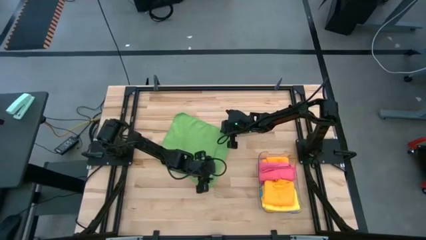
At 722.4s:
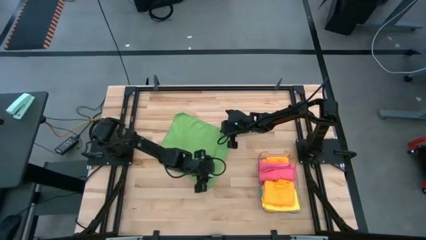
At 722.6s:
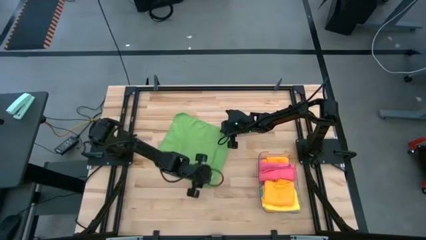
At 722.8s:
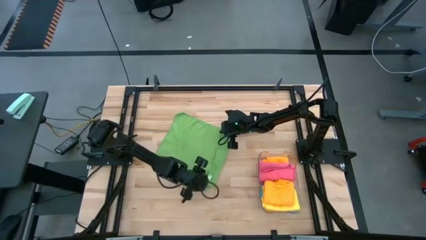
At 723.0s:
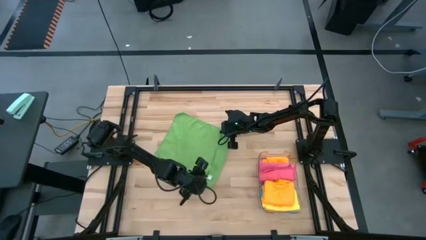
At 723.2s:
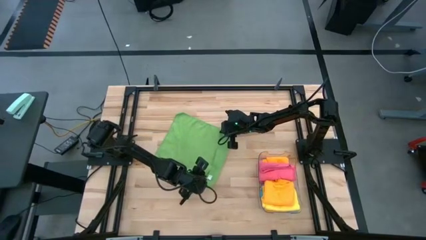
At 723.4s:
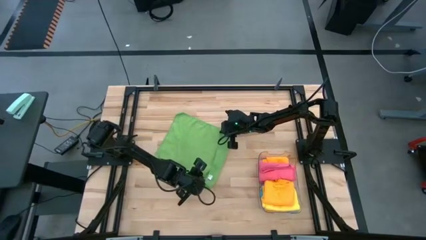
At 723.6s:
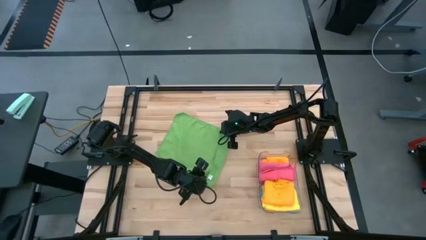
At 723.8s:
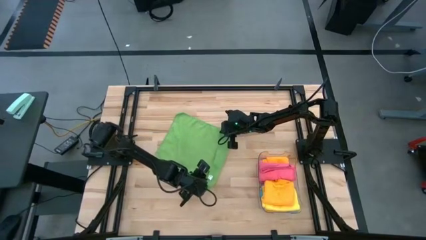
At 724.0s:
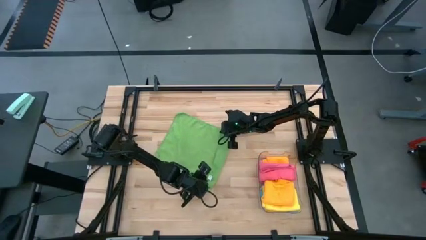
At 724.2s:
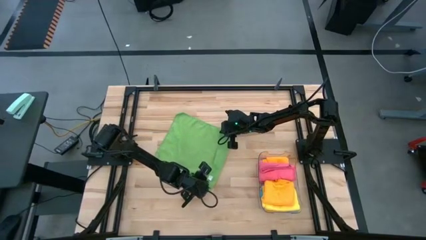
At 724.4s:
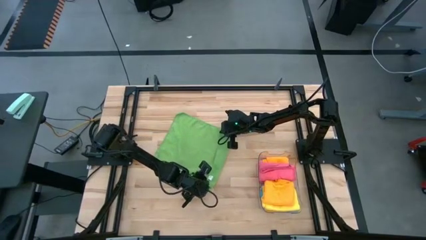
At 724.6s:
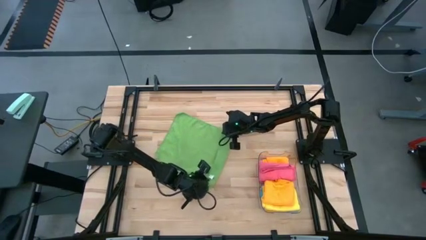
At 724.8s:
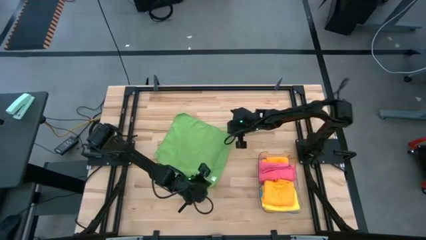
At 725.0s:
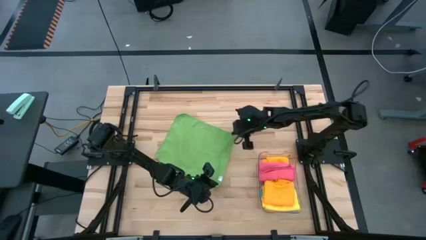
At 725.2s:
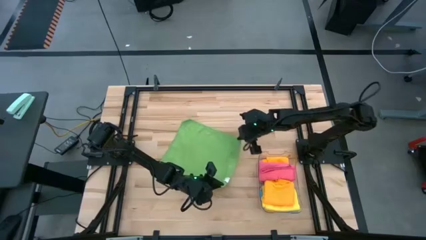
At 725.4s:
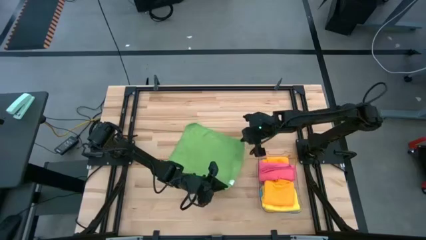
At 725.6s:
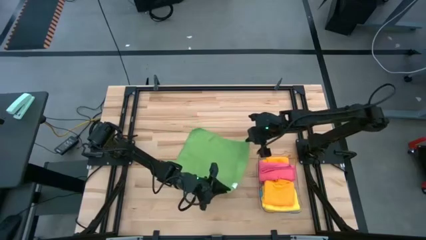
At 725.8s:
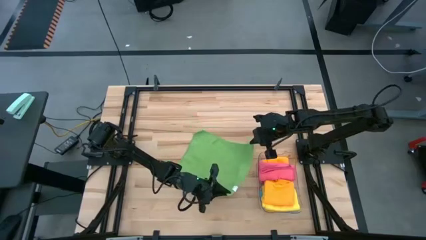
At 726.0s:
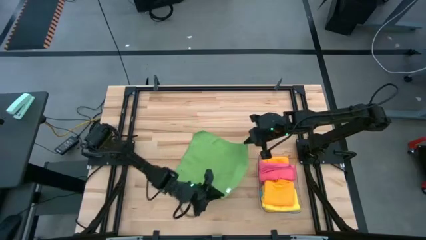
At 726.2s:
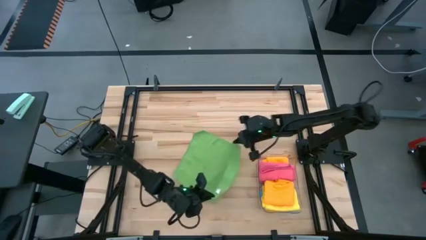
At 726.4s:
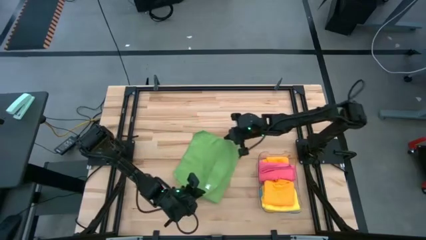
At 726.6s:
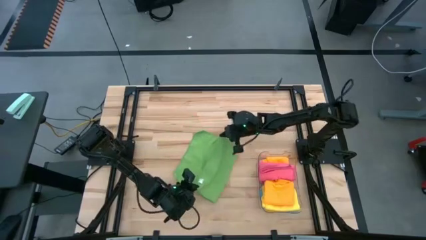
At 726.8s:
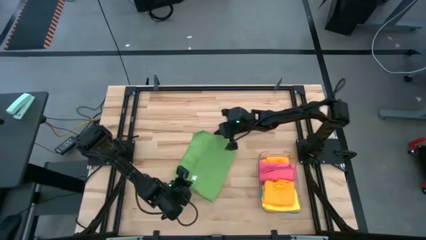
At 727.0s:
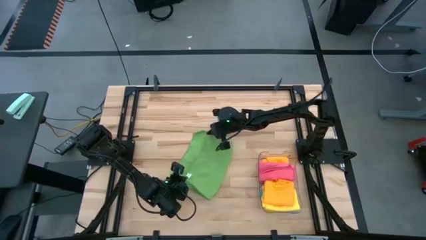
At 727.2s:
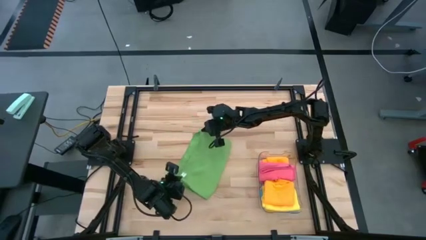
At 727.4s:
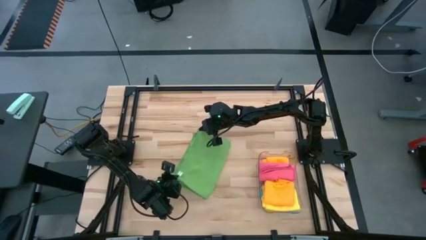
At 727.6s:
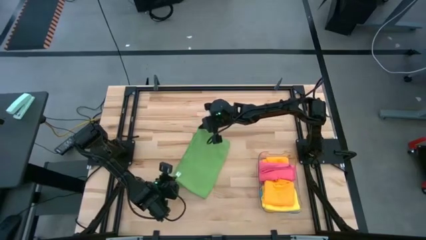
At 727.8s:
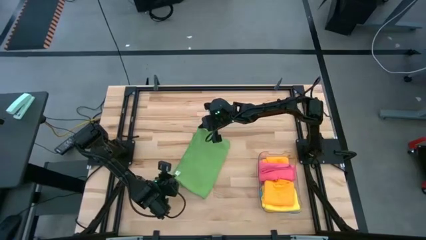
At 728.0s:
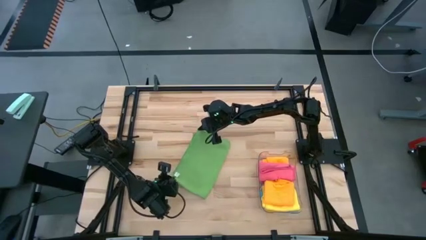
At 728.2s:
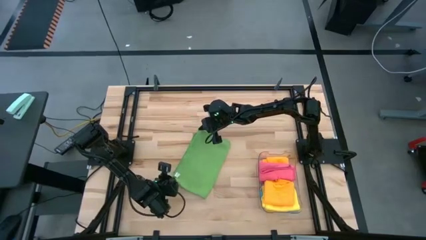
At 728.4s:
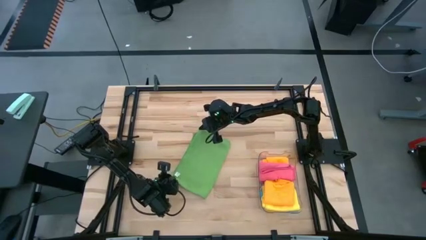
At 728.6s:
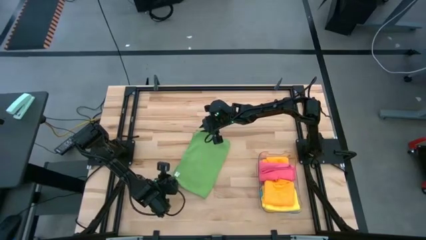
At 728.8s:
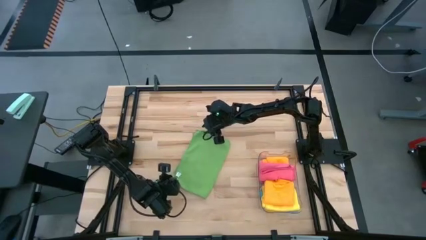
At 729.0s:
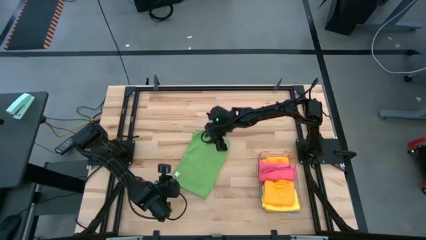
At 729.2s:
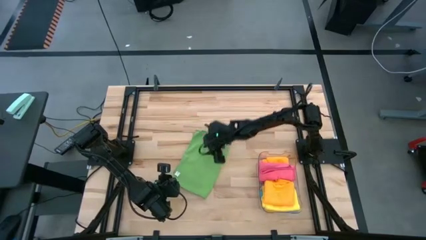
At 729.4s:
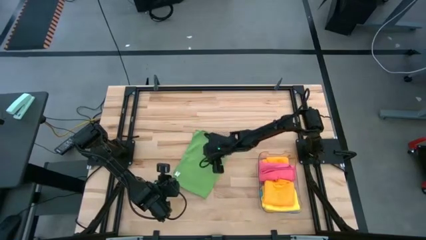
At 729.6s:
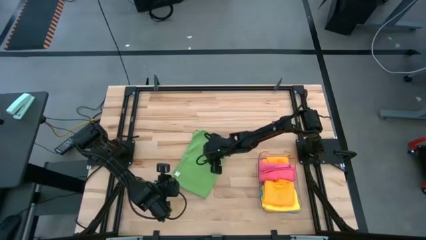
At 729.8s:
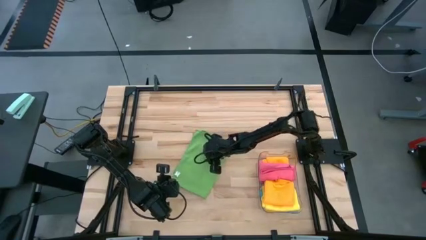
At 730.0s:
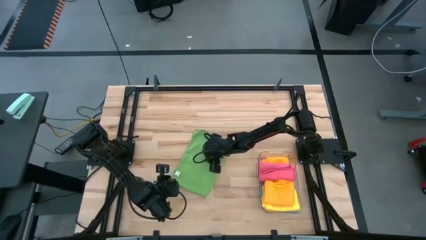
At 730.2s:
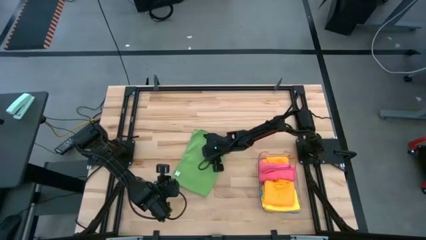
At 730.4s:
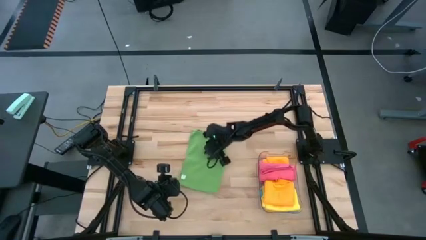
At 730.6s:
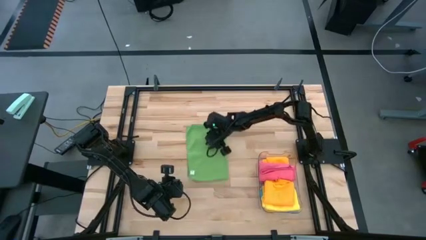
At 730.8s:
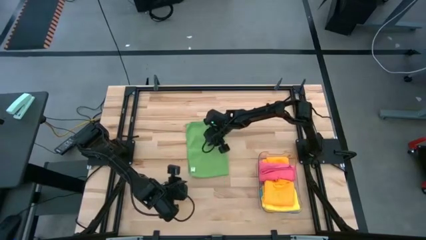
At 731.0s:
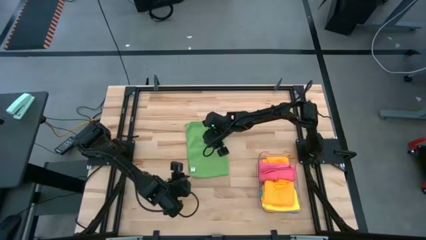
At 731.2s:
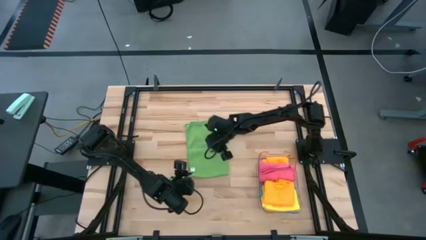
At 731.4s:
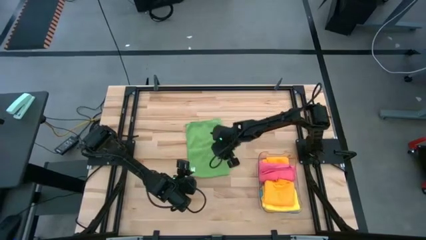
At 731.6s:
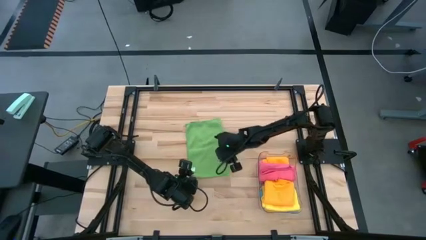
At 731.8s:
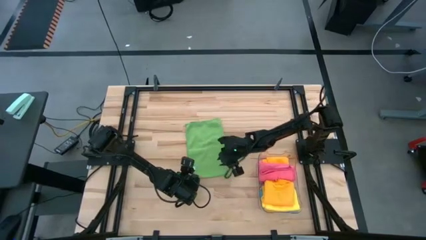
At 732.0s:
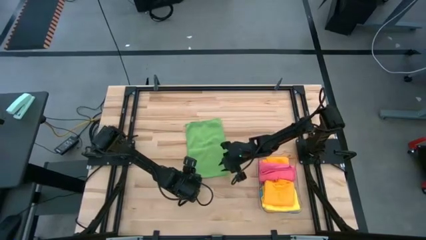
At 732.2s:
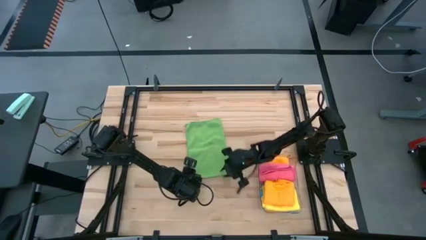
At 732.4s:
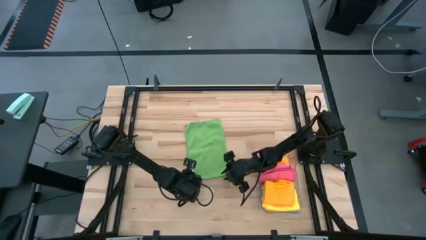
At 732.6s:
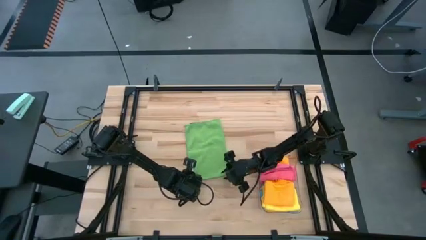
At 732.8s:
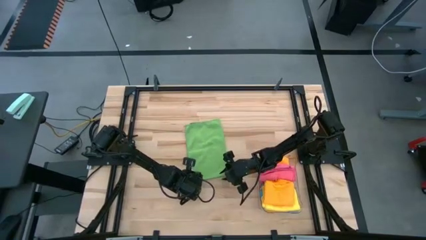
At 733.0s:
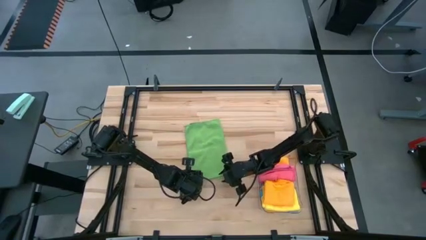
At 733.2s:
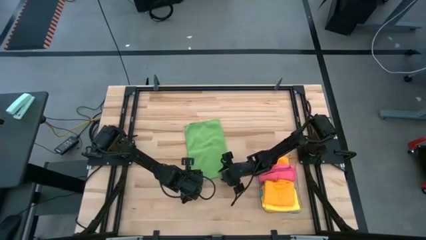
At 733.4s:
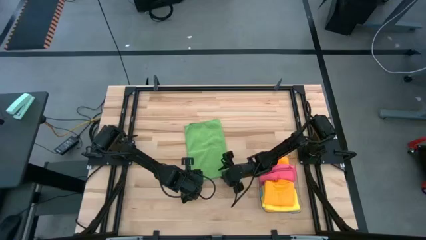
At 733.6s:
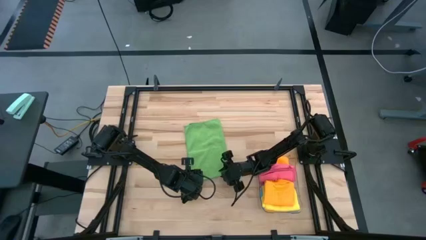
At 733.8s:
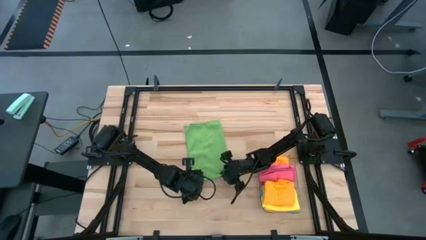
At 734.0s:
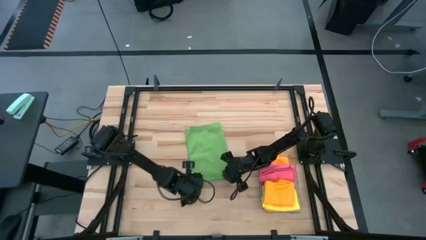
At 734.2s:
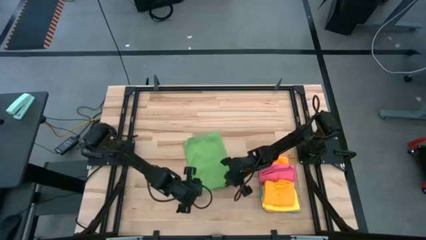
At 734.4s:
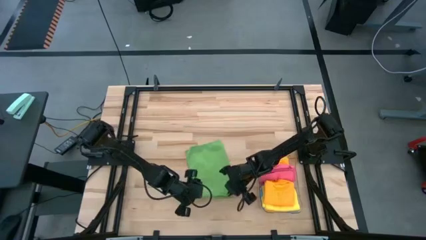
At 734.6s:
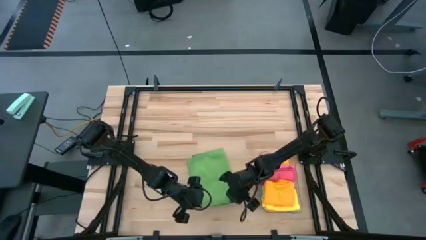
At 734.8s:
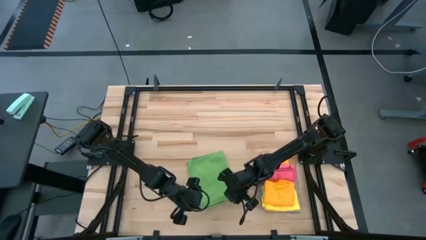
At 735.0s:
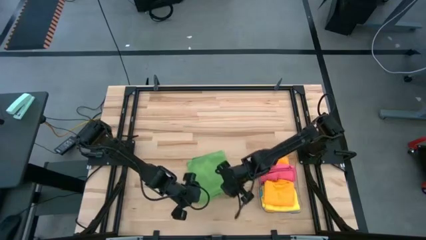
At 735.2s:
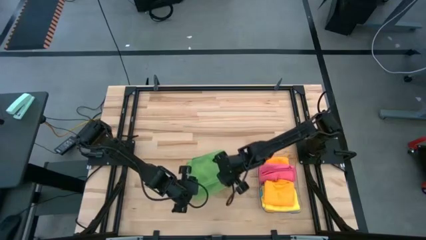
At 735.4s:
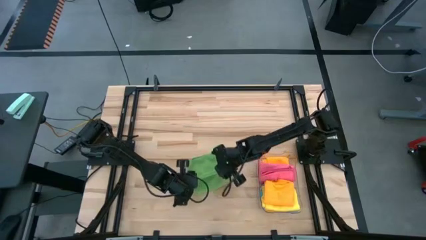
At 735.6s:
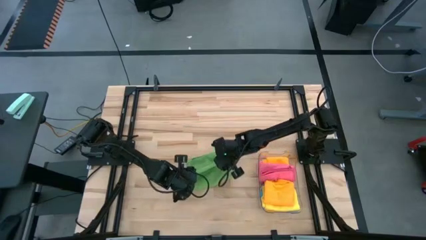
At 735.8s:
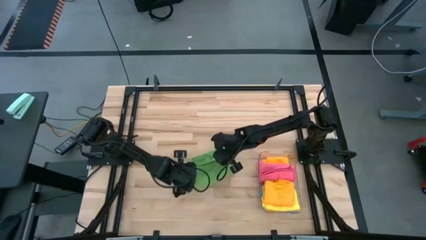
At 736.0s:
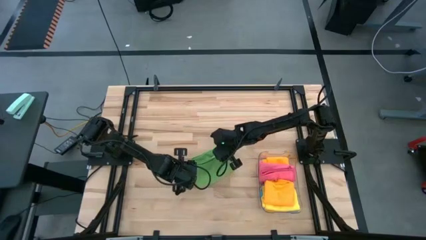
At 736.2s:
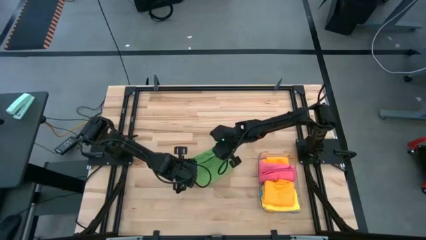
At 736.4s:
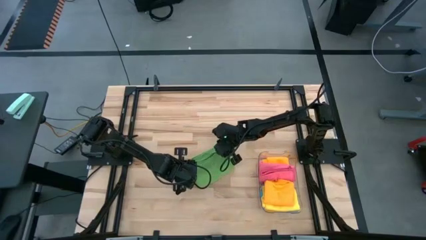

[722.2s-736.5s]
Task: Fold microfiber towels
Fold the green towel

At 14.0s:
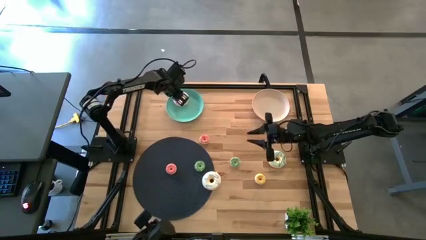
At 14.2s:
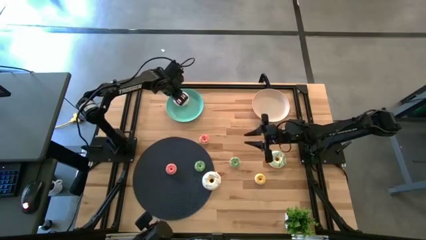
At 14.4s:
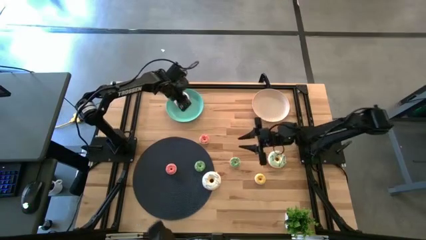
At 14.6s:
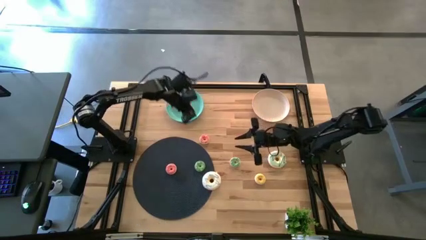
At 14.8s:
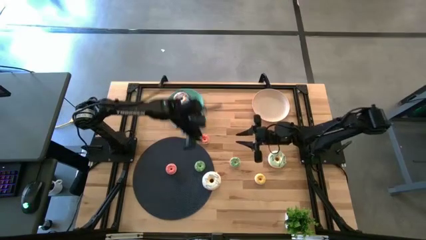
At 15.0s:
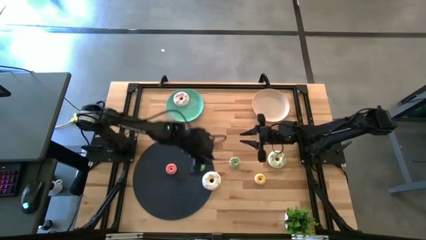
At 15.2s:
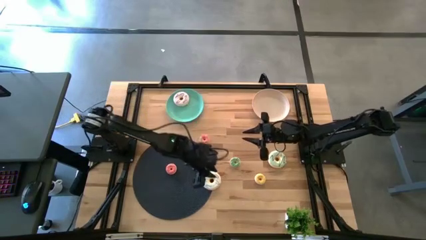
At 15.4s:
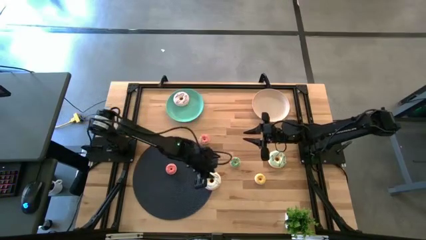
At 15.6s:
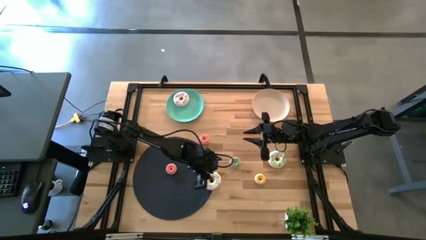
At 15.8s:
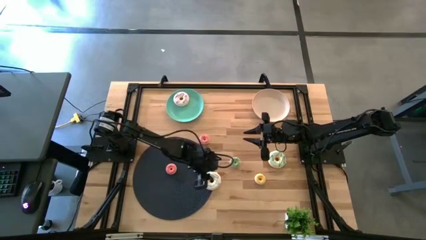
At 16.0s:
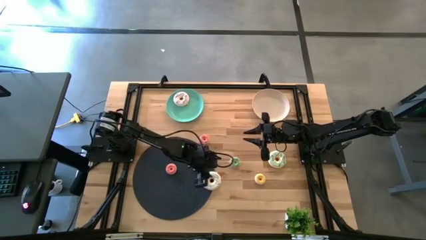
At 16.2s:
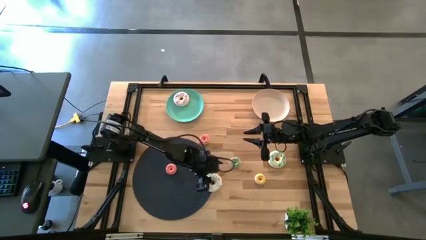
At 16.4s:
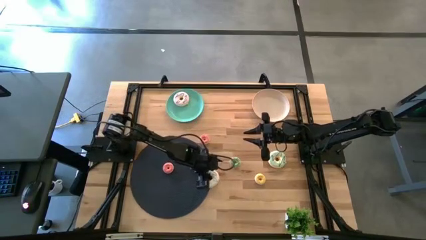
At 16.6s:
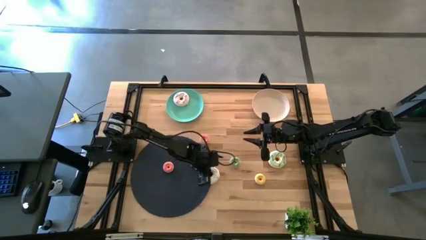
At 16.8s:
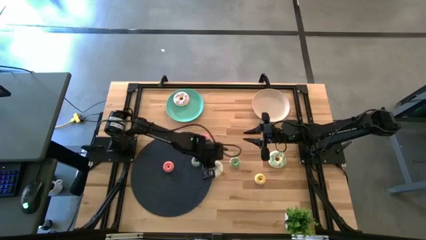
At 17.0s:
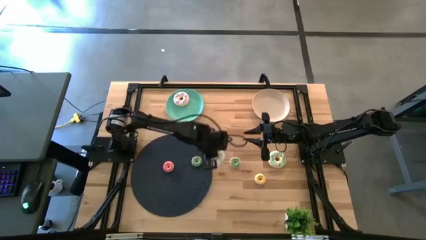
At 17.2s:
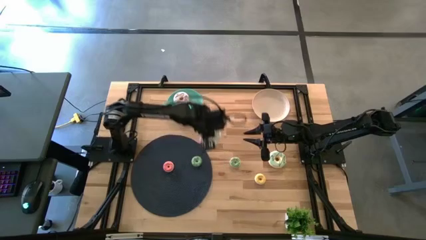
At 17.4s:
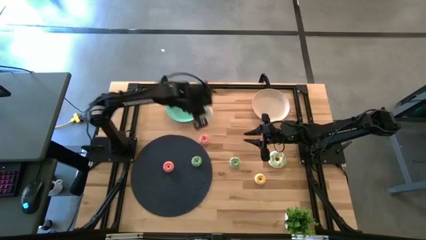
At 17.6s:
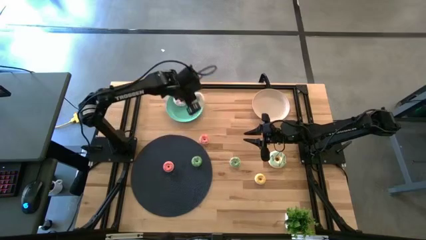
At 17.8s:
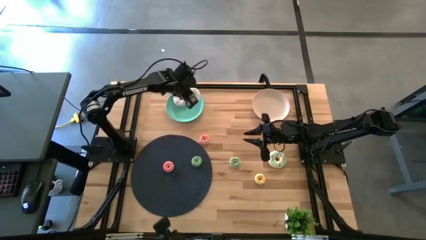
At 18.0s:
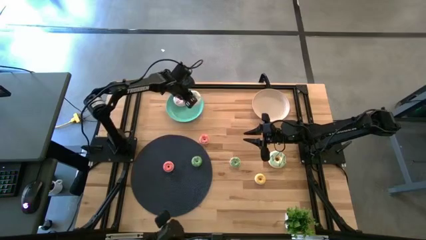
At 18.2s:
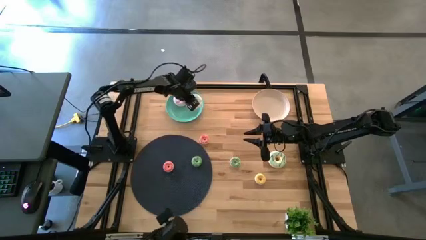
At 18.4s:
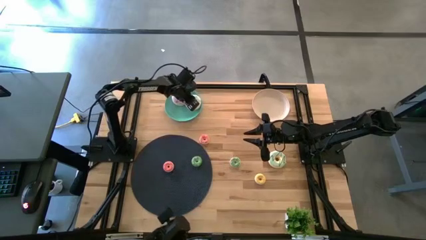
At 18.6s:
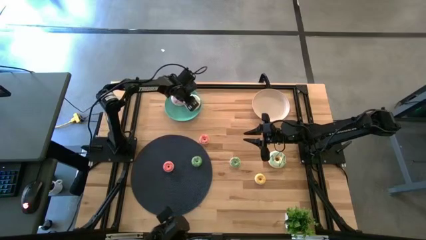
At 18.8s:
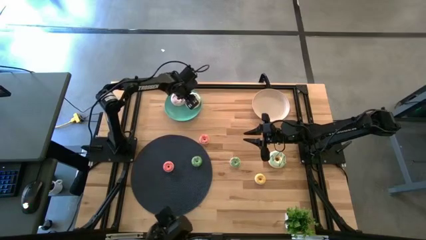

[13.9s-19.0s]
Task: Pick & Place donuts
Put the large white donut on the green plate
